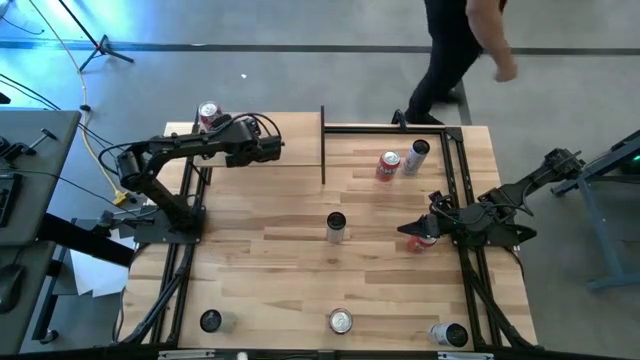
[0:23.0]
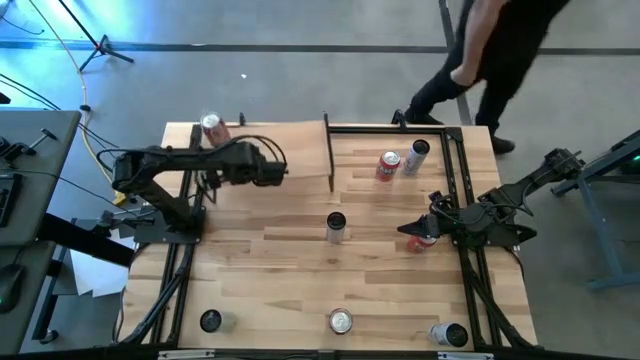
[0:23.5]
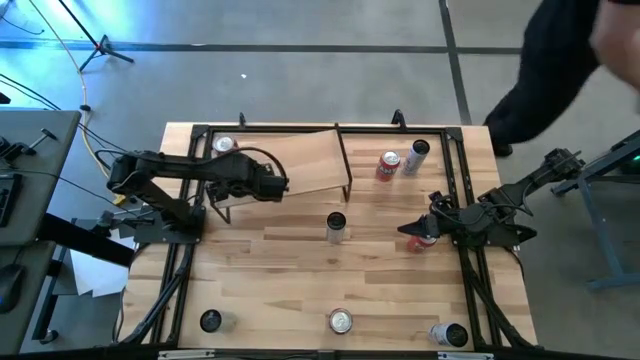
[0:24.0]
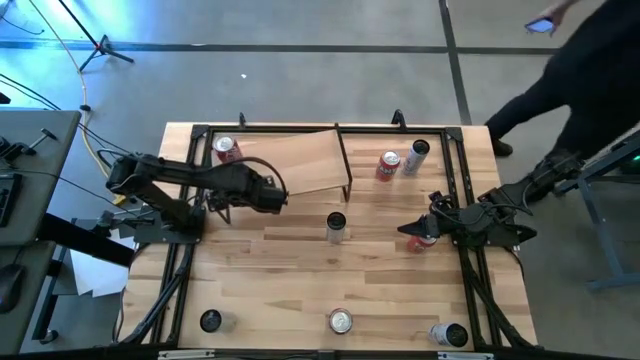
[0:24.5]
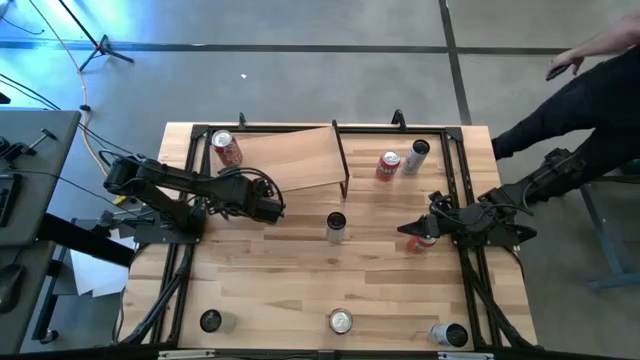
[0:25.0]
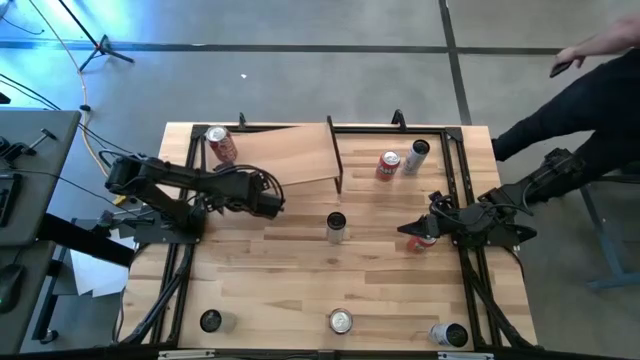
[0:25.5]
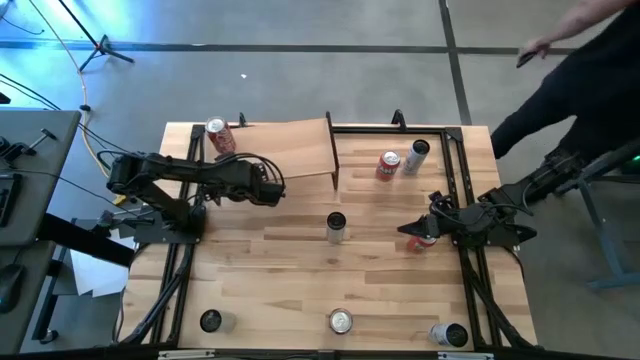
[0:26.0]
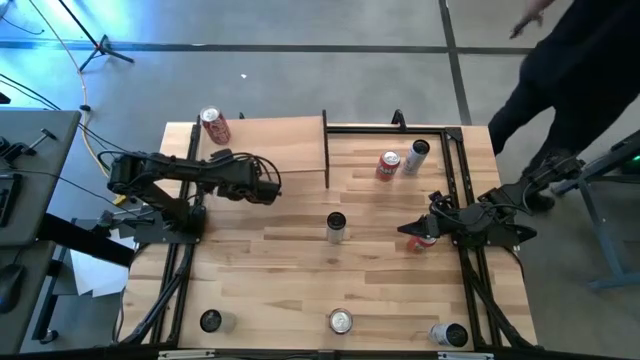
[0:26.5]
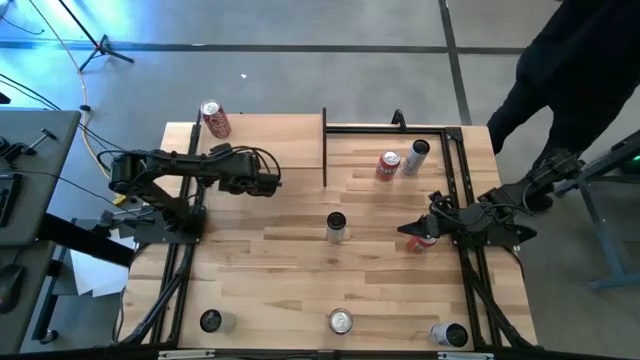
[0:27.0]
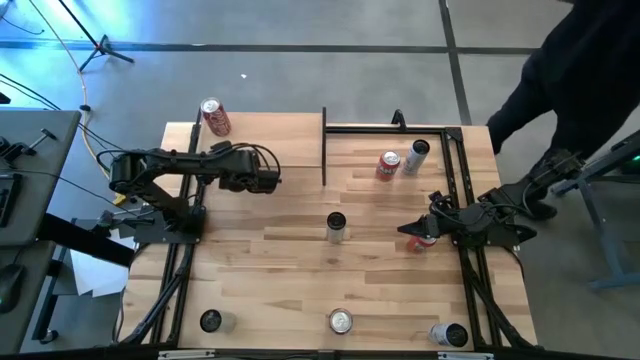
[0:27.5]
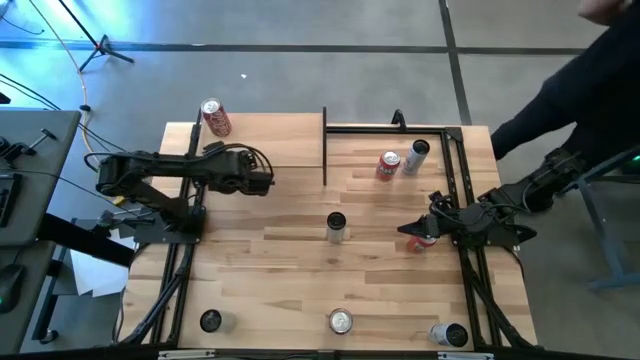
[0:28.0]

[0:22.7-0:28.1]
Task: Place canned beverage on shelf
Adjust the shelf on the table

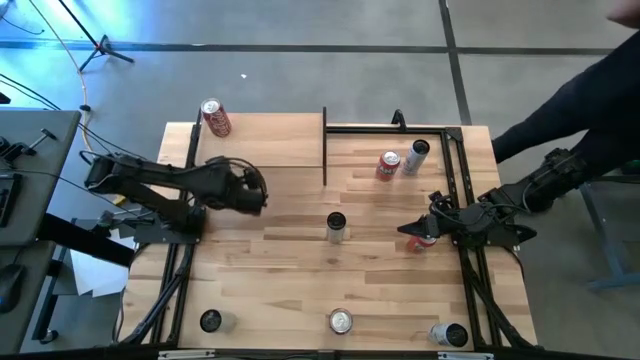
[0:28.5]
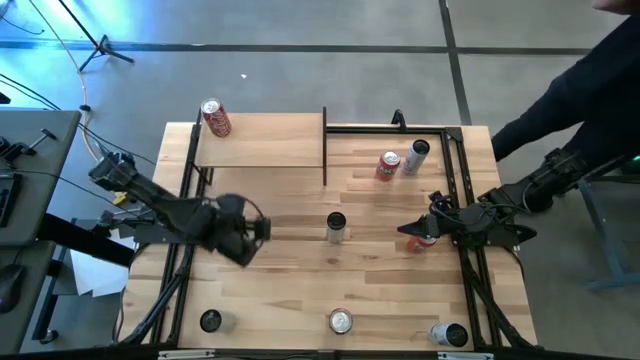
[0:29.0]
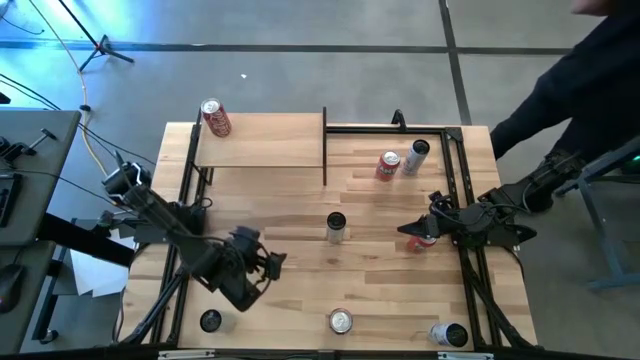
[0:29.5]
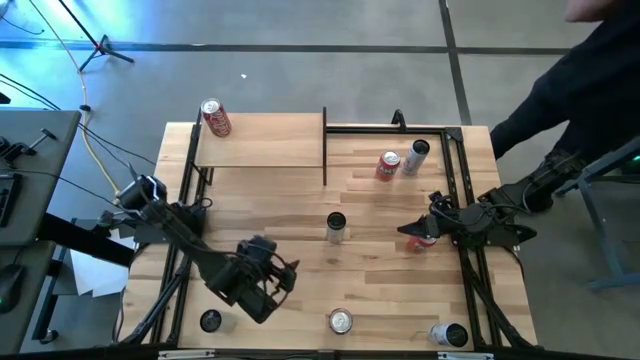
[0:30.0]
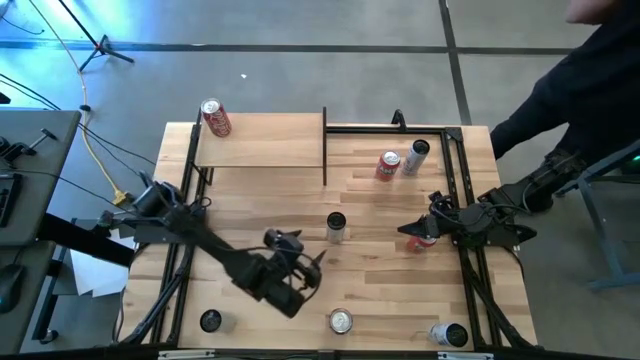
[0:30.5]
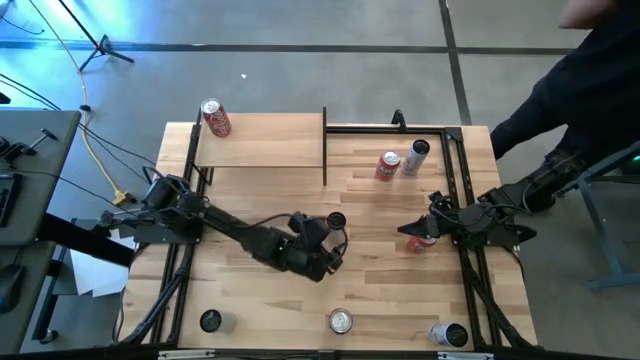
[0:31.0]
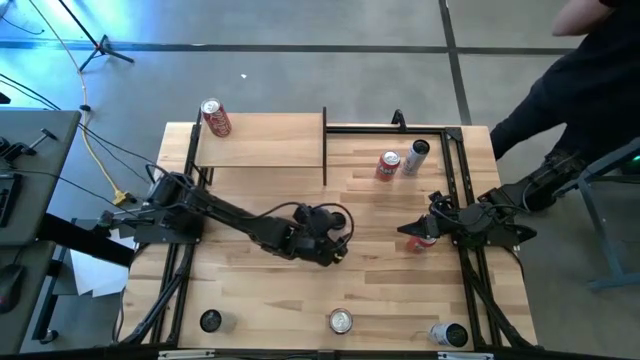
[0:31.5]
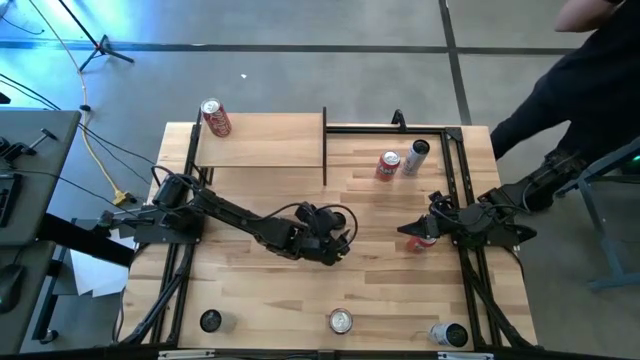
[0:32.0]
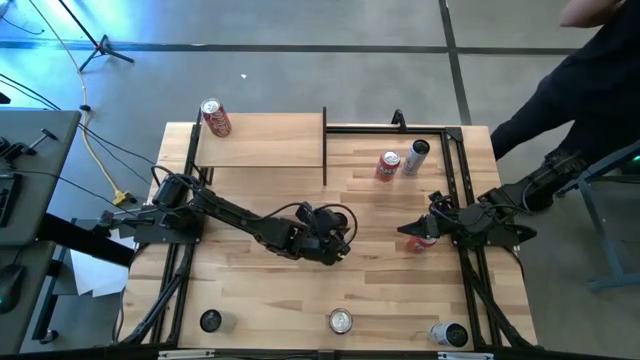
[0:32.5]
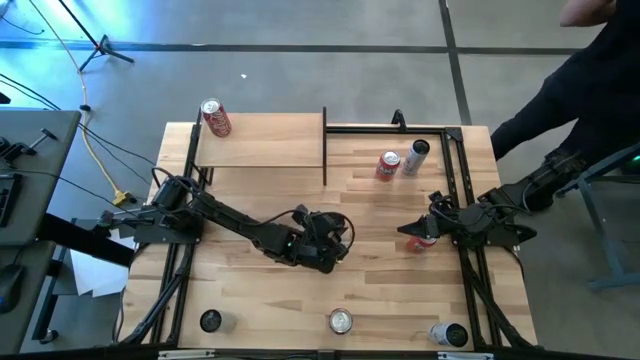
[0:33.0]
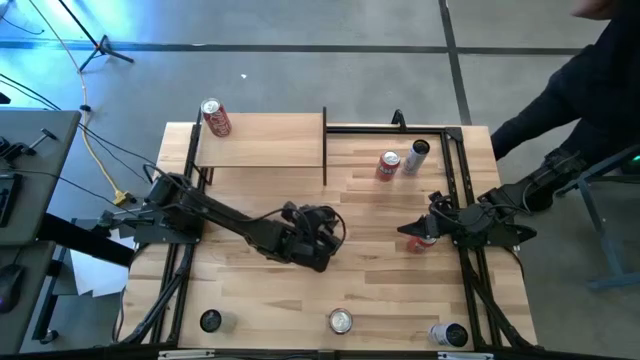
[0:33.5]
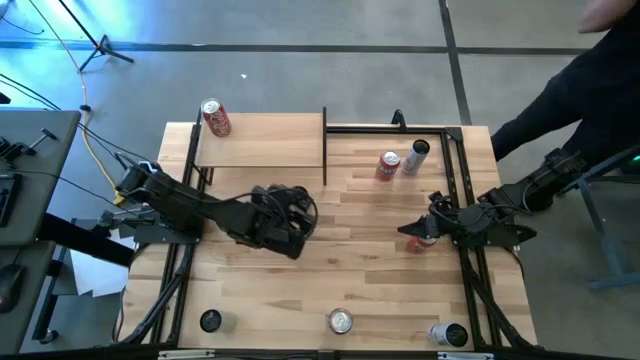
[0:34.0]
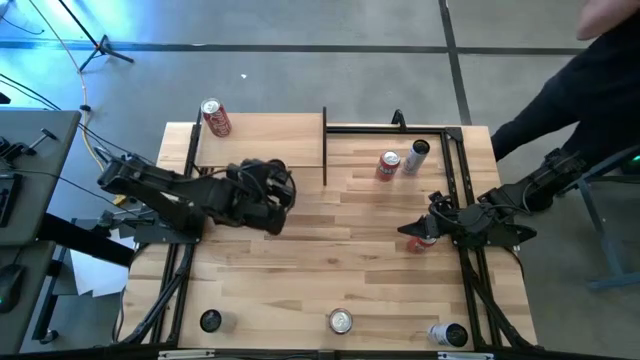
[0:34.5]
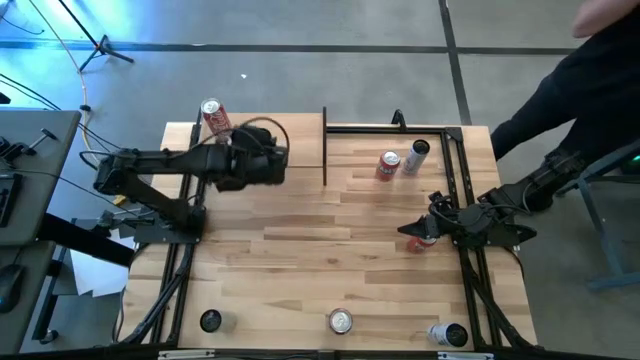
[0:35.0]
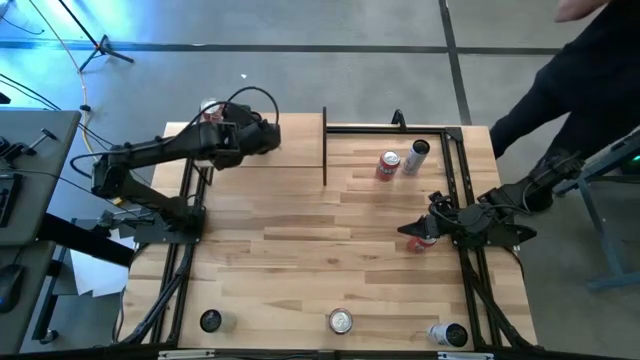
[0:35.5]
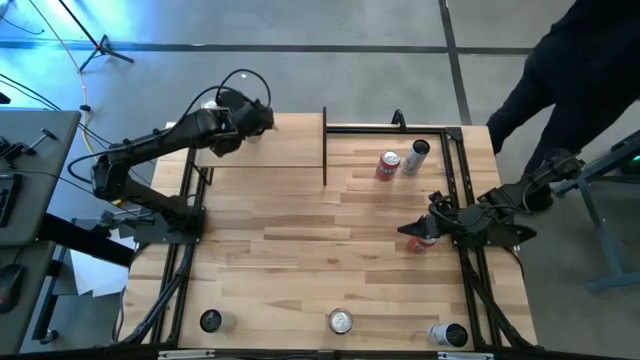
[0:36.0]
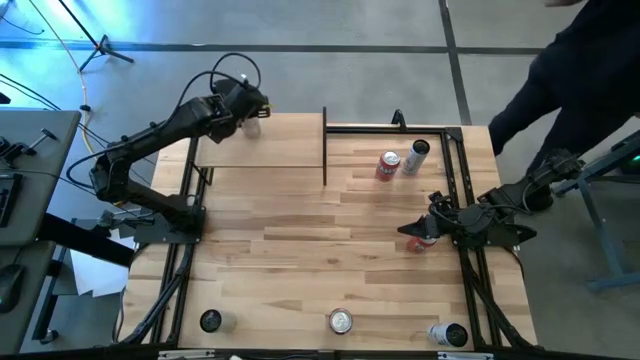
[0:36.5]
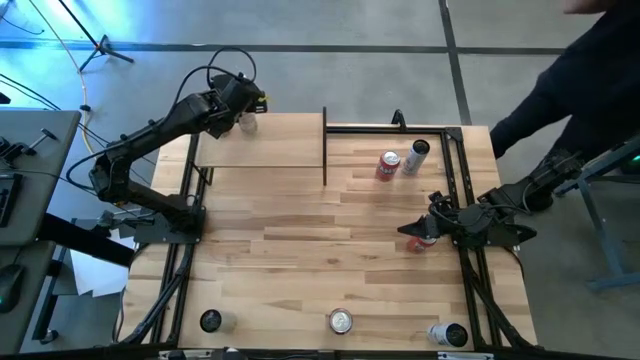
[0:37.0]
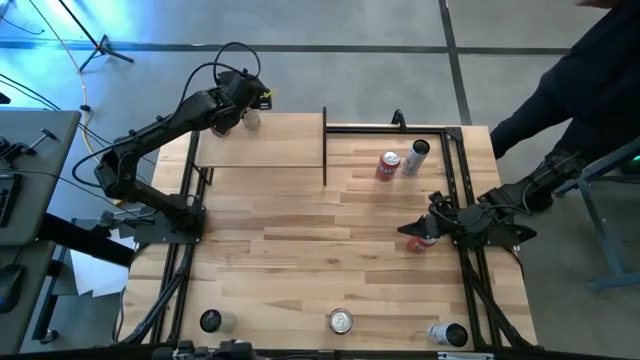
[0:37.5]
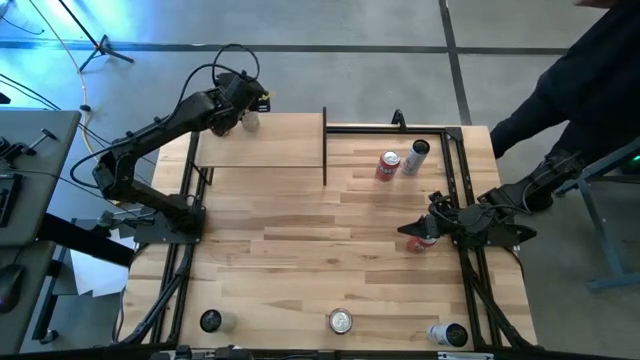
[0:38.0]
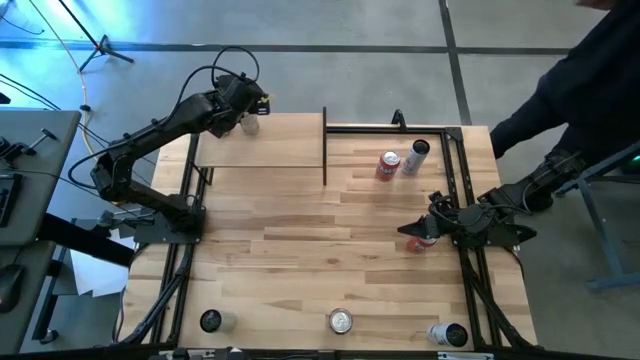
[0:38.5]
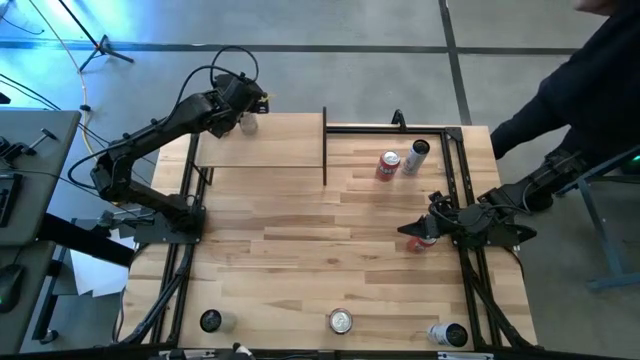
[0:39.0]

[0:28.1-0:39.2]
Put the top light orange soda can on the shelf

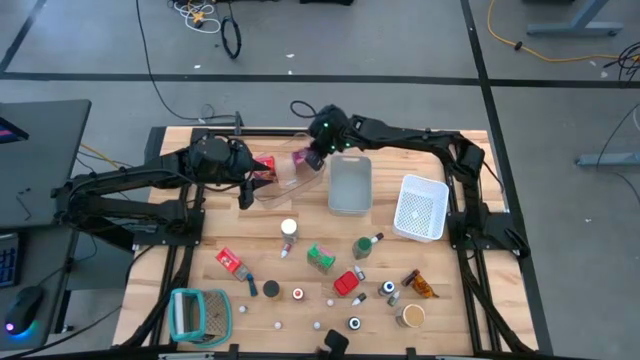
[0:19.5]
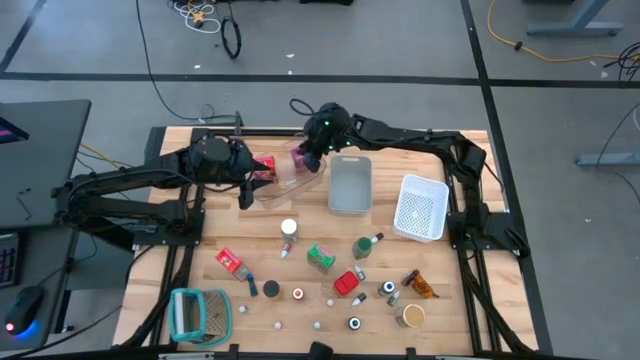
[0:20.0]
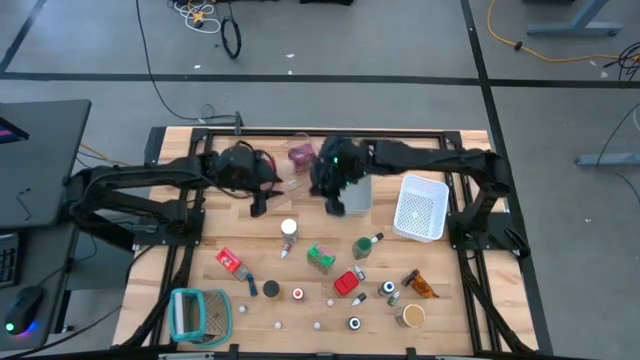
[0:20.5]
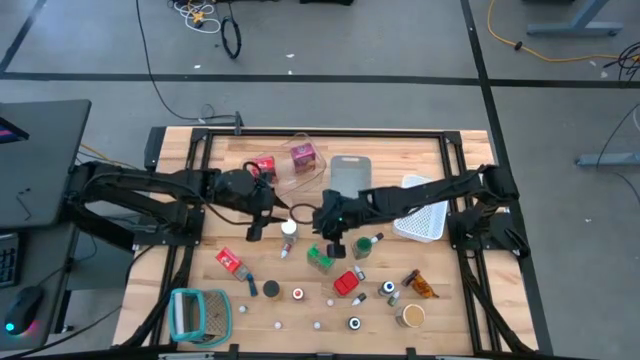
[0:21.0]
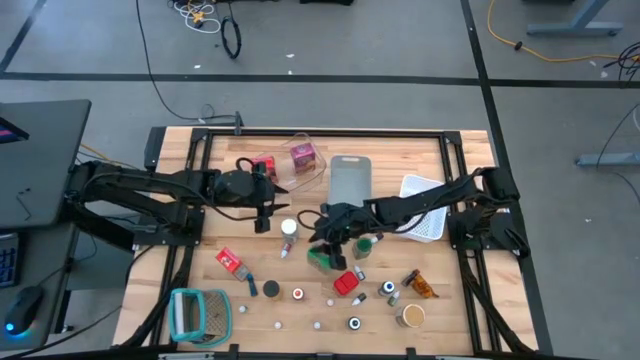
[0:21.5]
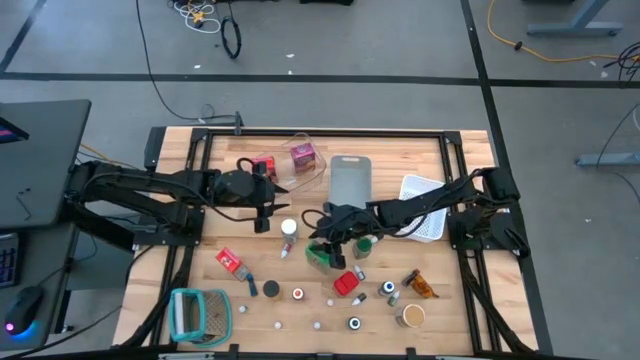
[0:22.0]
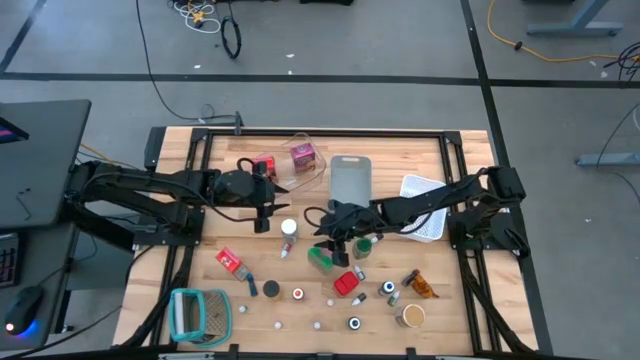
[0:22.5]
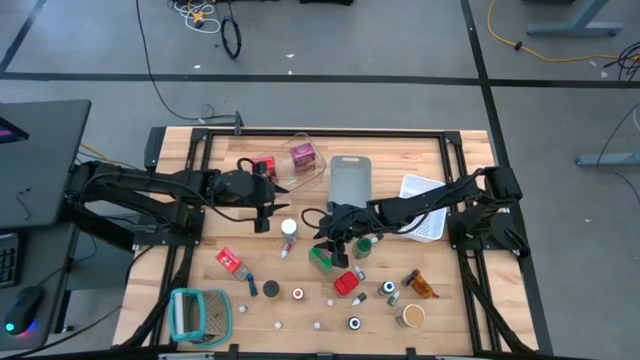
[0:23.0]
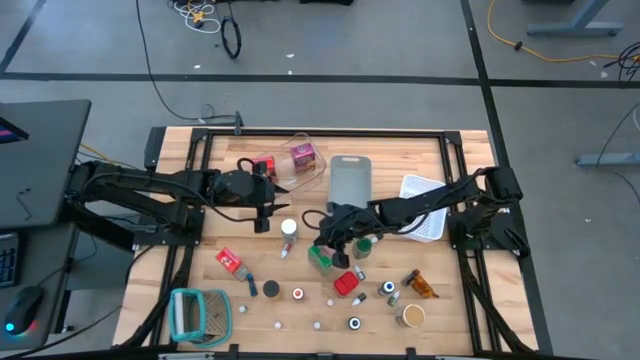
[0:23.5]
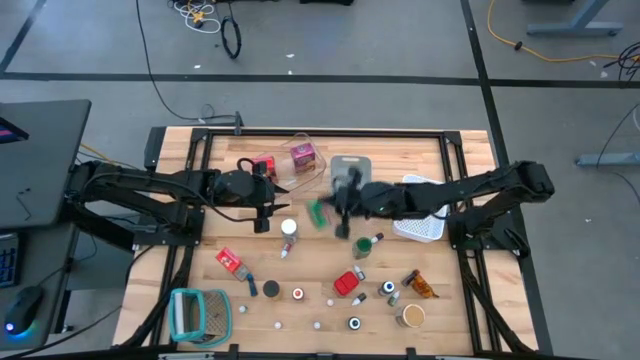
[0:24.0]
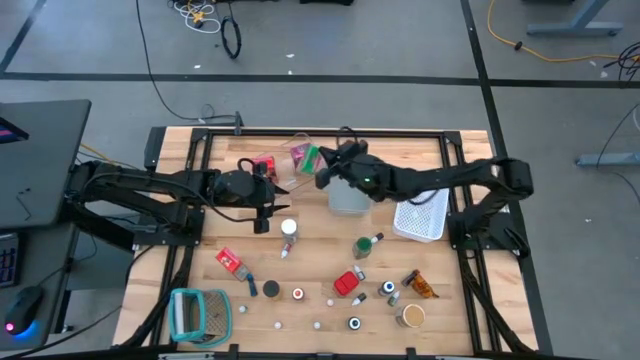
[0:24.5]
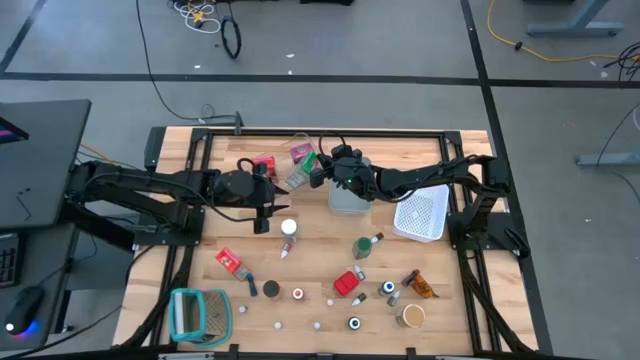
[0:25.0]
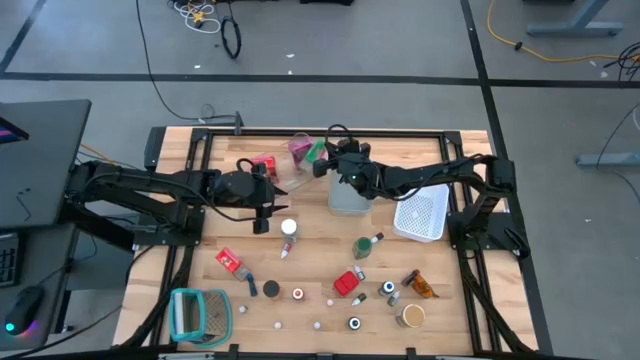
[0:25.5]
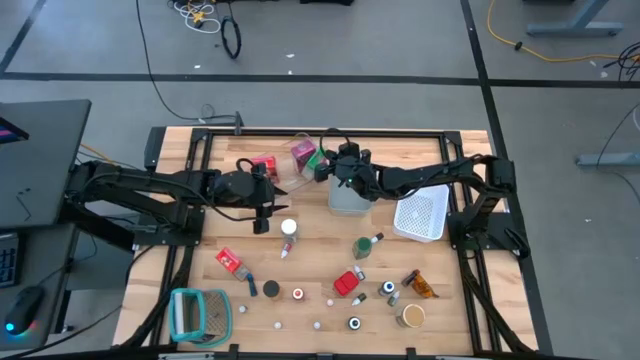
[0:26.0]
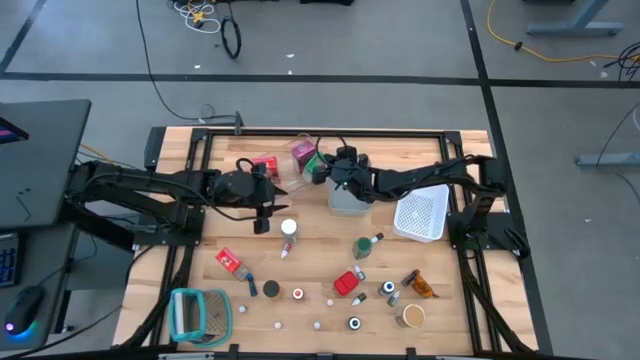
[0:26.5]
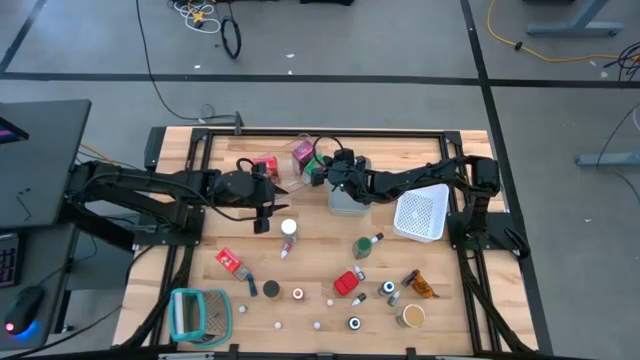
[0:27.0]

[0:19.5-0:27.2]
Task: Pick & Place Kitchen Items
Put the green cereal box into the transparent bin
